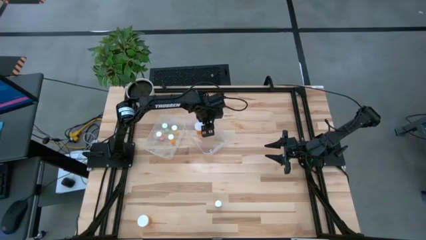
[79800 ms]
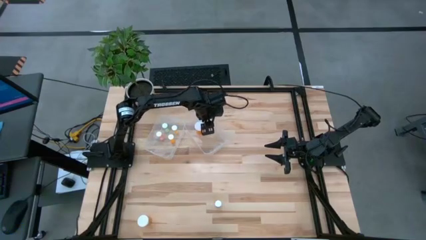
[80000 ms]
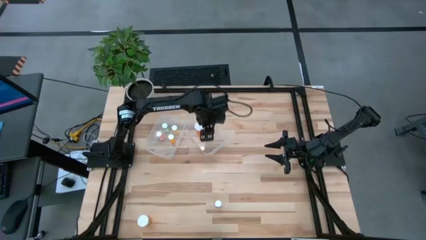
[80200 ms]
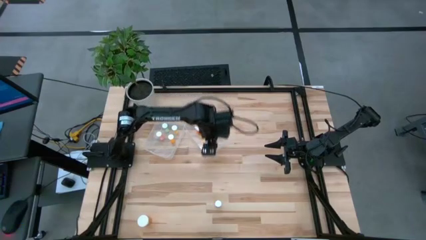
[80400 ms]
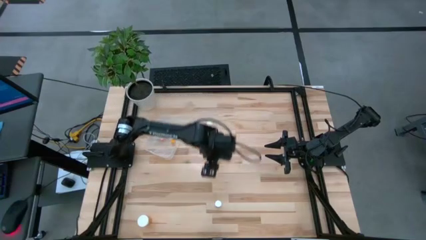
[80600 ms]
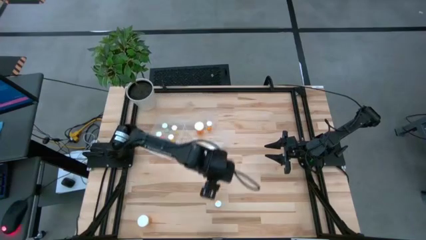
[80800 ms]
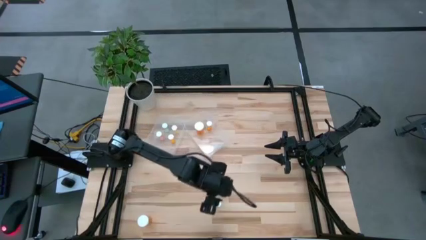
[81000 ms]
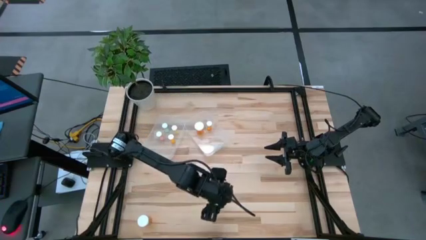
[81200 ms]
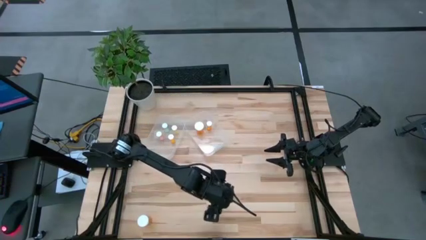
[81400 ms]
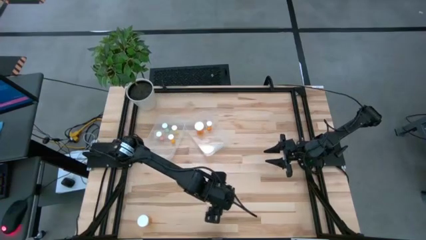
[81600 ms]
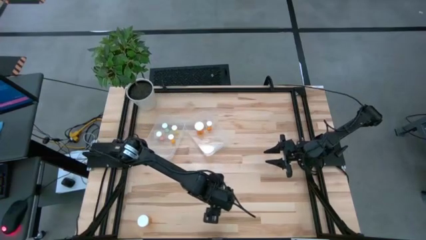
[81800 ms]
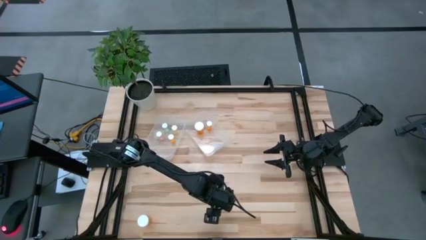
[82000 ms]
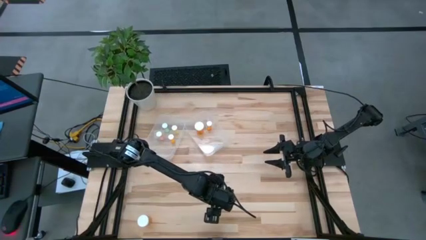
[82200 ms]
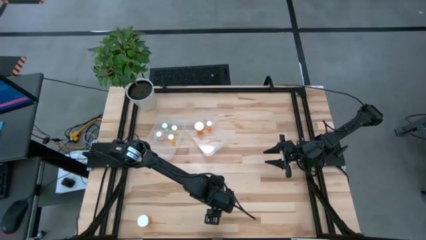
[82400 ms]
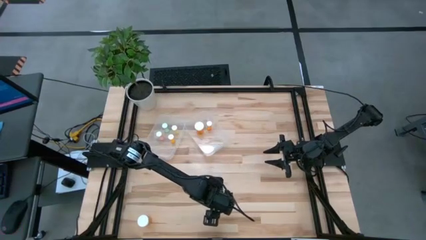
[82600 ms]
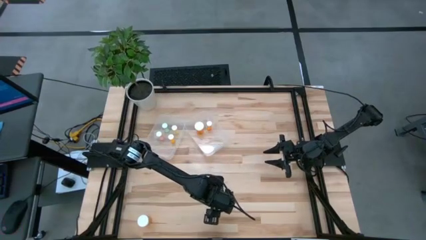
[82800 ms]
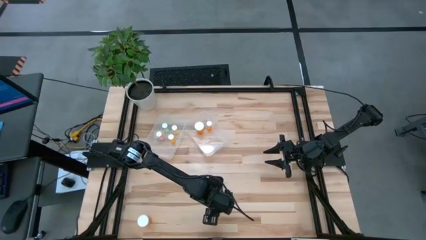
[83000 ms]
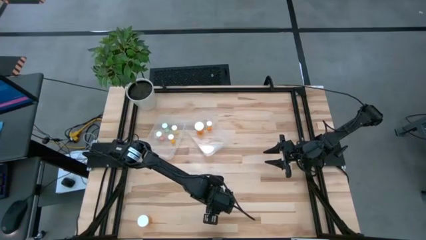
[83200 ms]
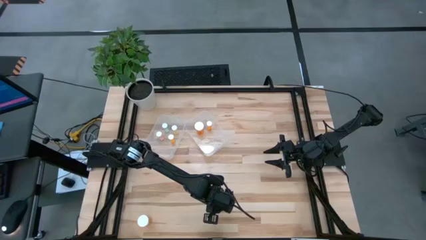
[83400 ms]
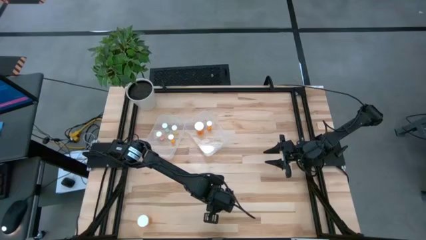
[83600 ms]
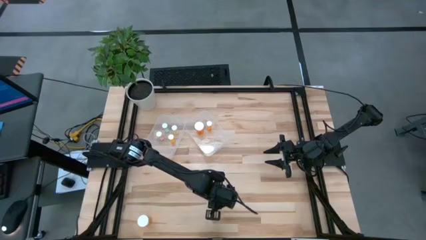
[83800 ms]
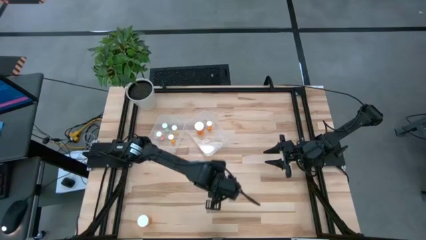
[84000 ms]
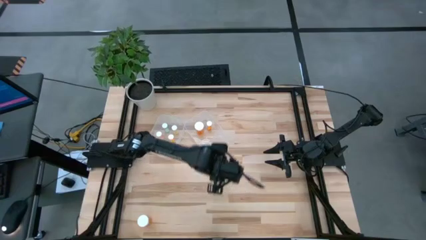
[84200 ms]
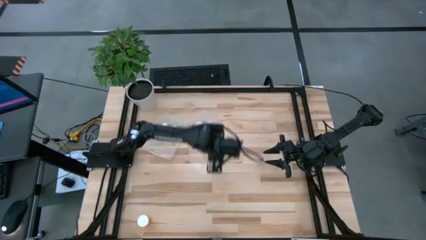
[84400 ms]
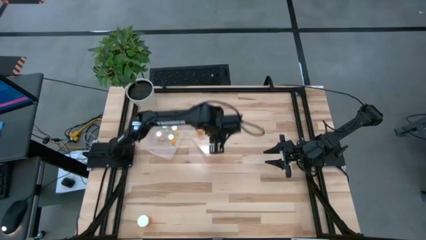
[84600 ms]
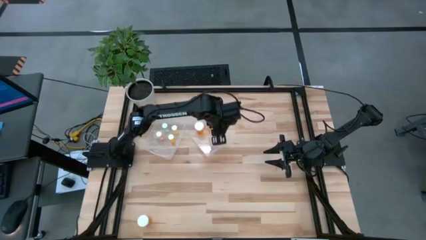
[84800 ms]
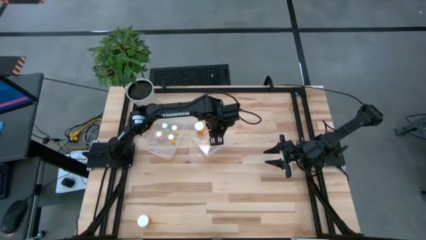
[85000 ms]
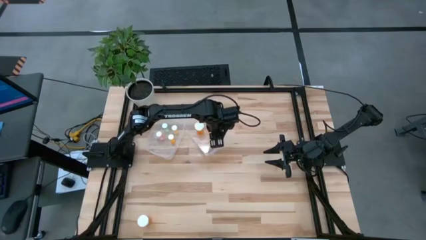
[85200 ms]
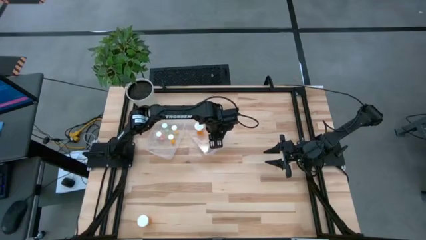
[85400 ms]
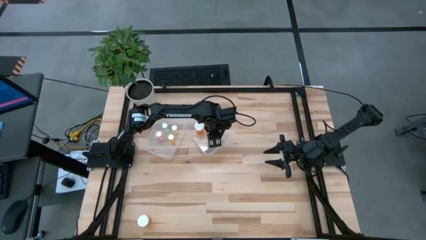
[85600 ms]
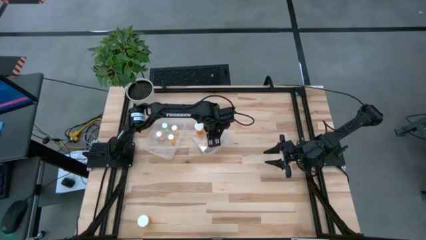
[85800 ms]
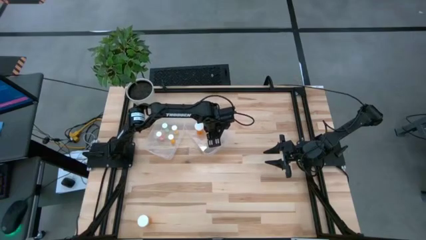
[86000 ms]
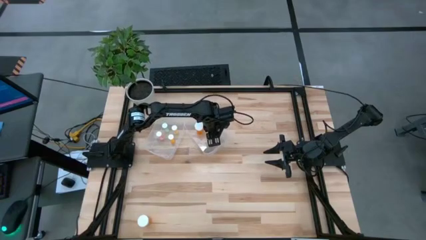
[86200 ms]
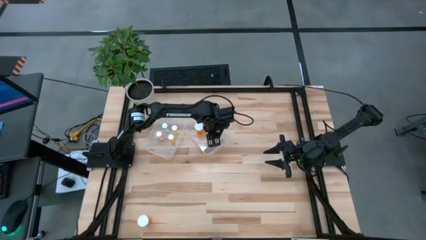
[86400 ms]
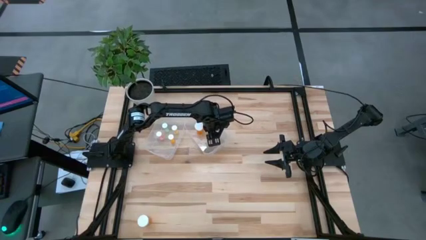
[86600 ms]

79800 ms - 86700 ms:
Task: Pick and place medicine bottles into bin by pill shape (circle, oval)
Put the blue capsule bottle into the right transparent bin

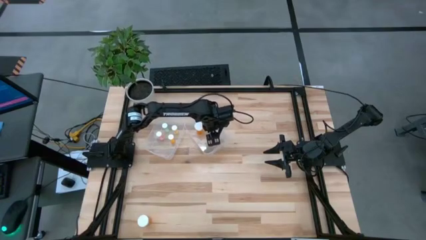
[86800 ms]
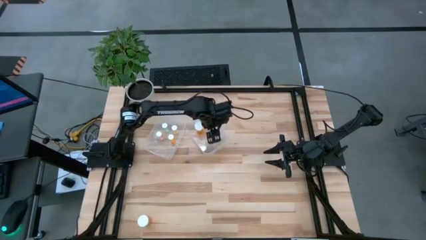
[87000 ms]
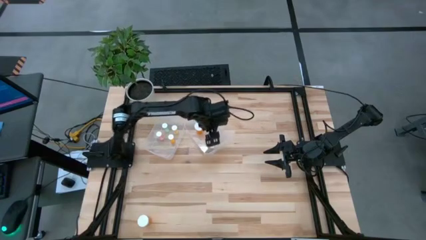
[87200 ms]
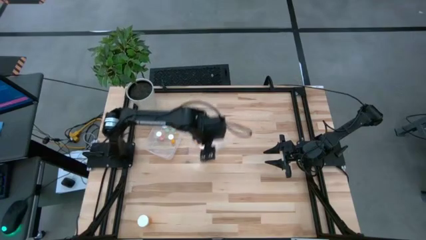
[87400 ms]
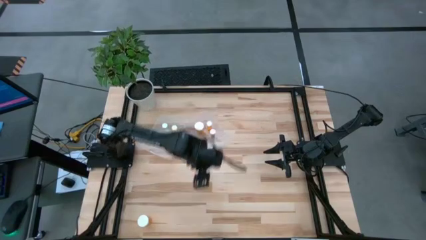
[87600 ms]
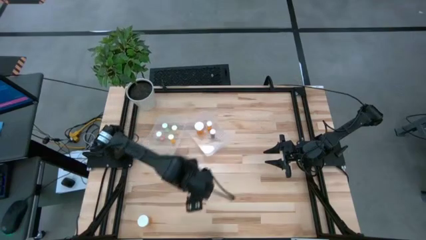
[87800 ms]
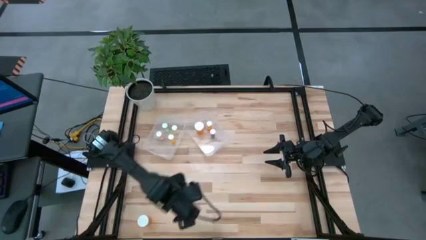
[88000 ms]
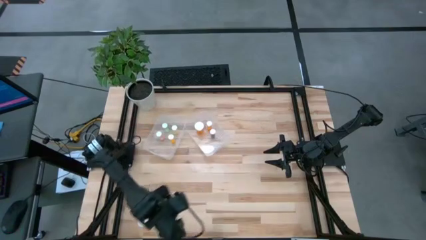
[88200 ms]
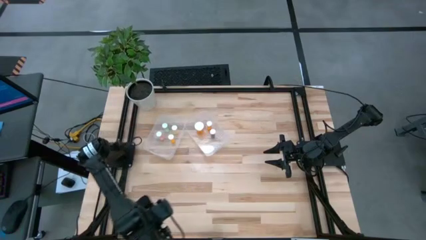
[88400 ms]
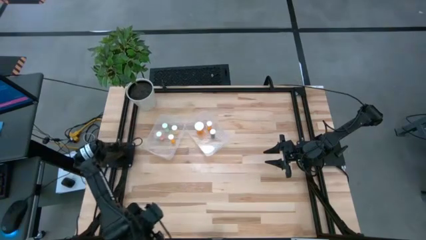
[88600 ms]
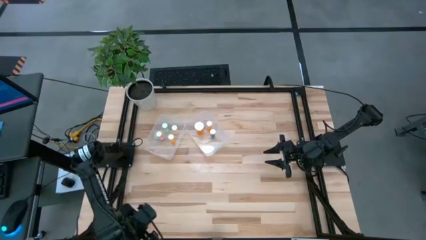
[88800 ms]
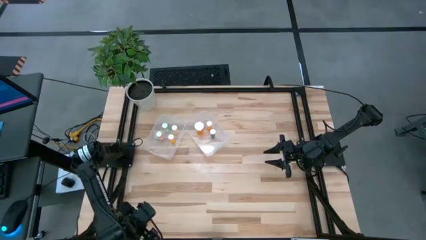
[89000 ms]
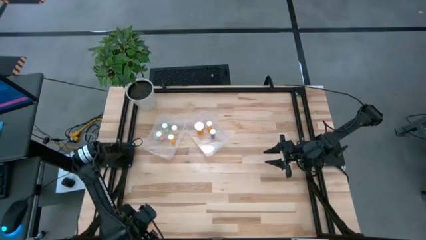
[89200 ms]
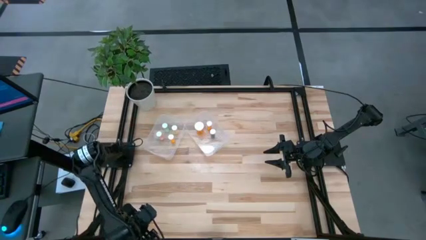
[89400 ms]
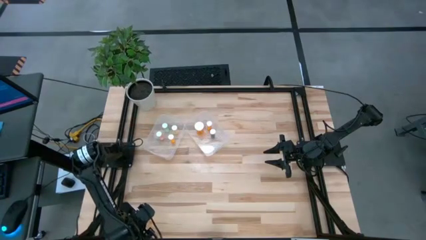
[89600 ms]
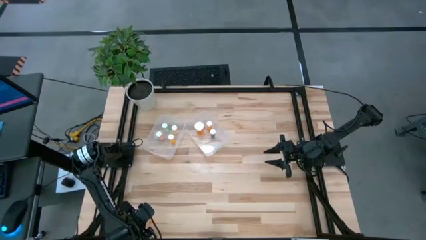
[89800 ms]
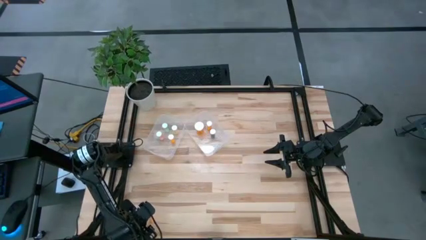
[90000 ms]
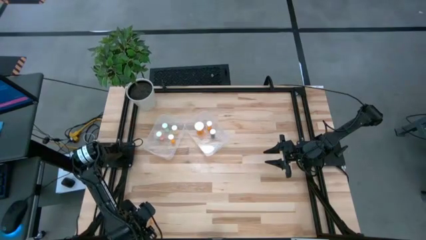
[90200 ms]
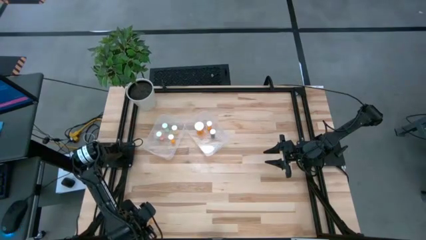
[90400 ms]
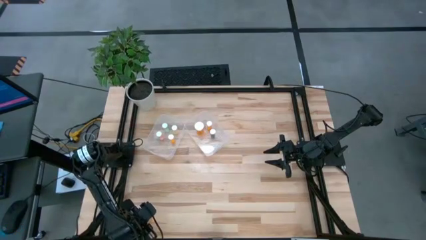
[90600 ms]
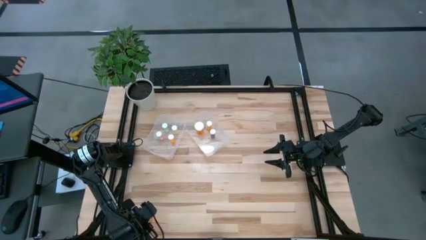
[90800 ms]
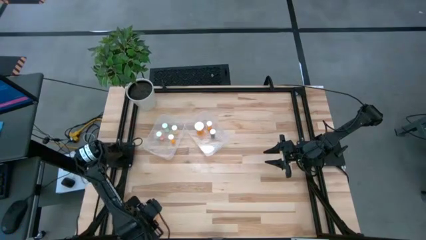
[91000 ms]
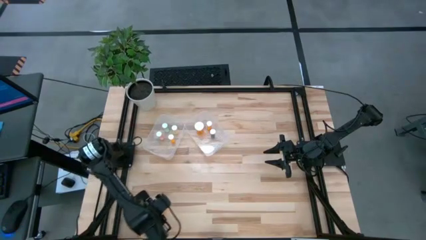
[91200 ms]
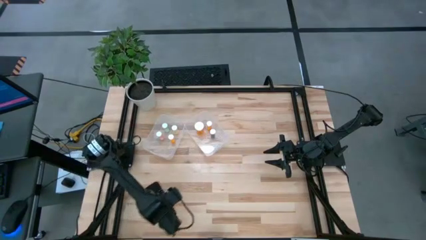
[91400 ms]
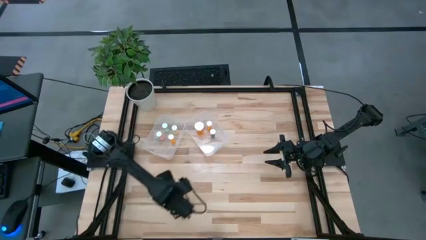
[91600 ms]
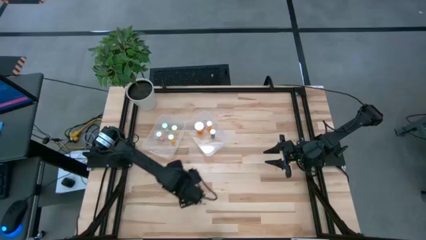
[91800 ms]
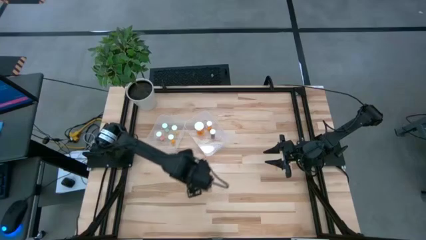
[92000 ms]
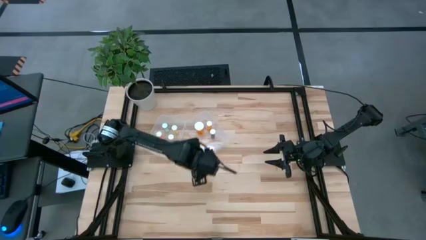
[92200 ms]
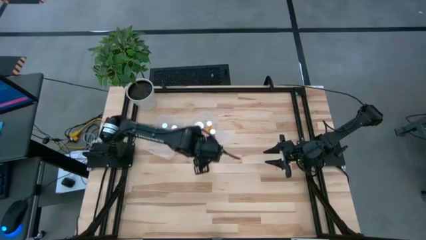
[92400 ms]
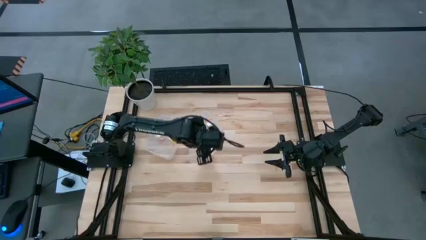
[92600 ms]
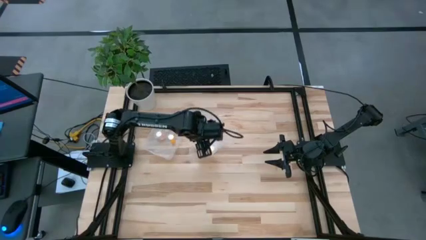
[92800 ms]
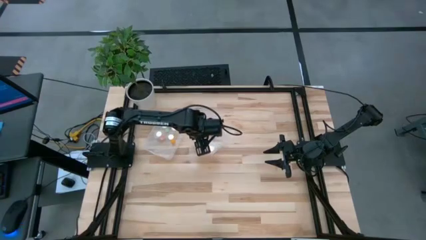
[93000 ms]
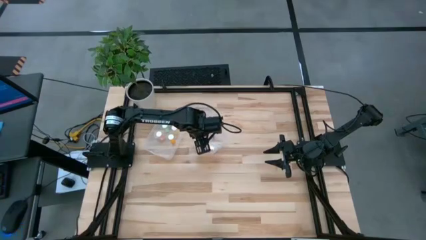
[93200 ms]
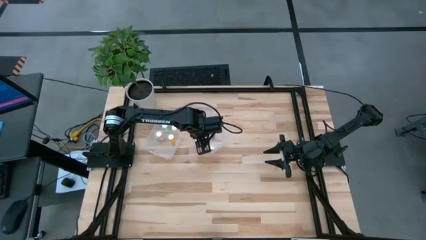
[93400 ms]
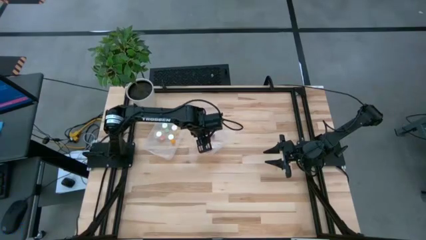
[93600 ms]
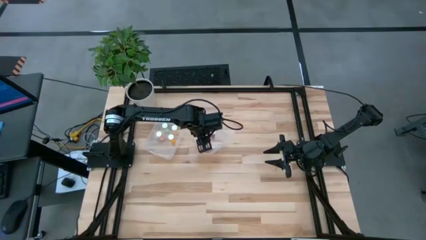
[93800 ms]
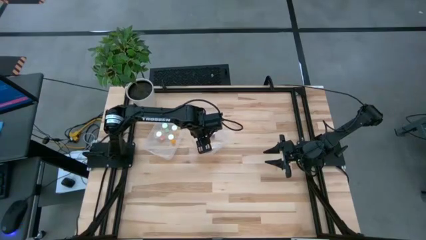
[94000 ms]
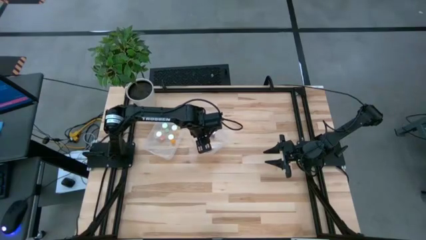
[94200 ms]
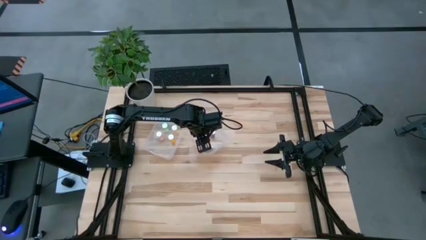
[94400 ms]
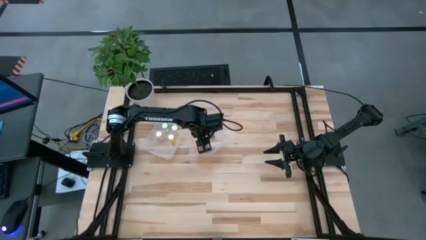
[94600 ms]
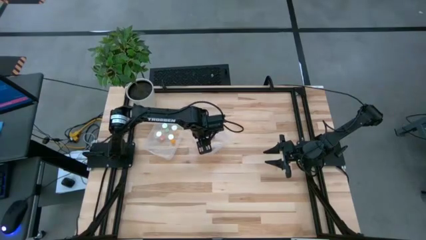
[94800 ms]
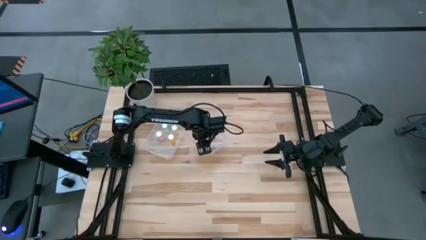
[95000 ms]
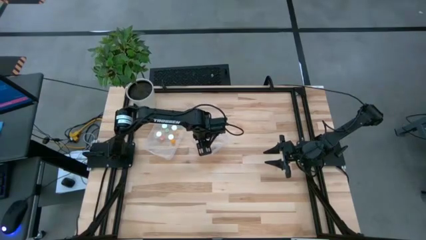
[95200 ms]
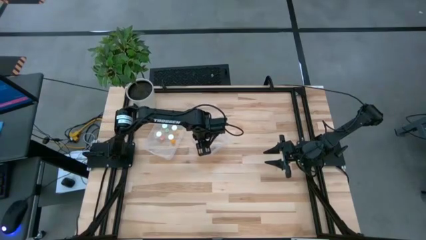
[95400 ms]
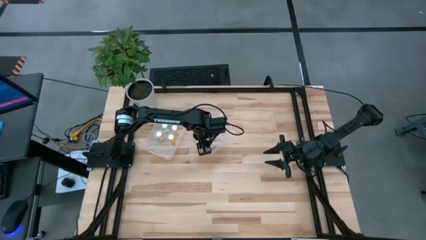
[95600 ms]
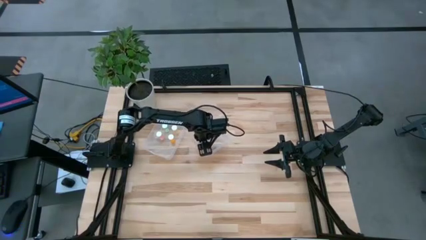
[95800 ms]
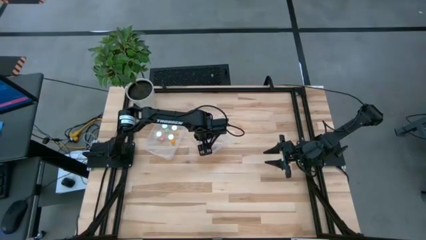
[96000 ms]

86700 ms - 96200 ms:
Put the orange capsule bottle into the right transparent bin
